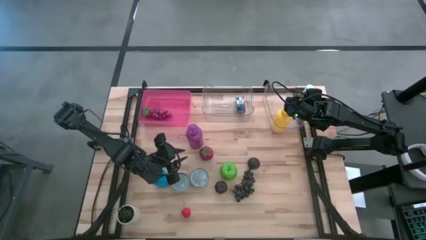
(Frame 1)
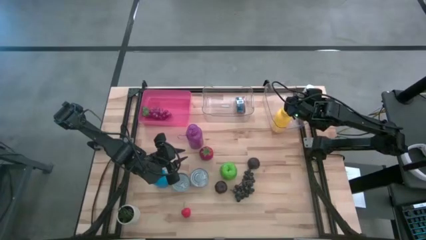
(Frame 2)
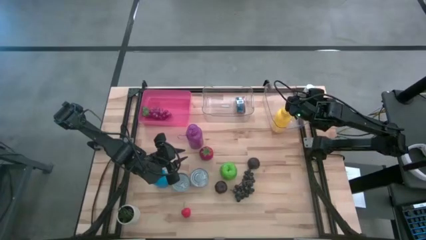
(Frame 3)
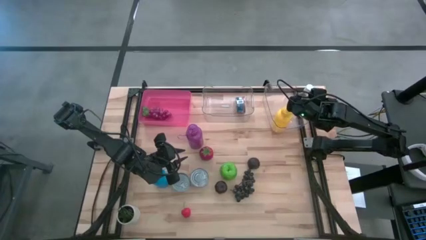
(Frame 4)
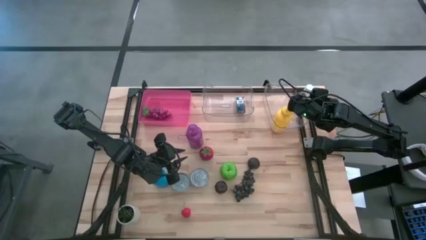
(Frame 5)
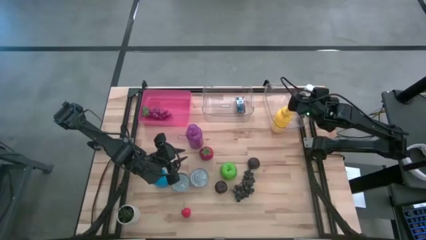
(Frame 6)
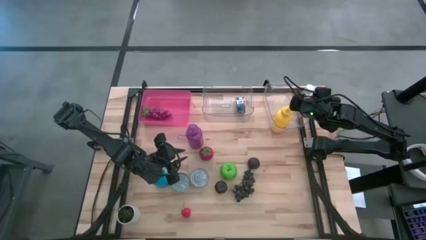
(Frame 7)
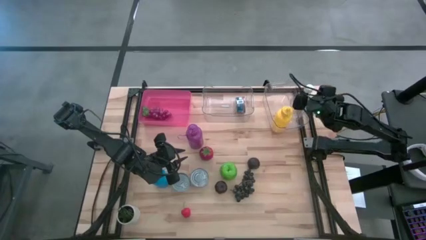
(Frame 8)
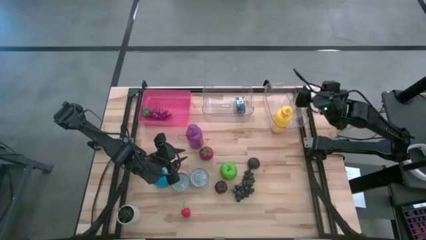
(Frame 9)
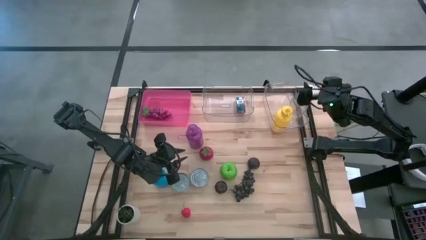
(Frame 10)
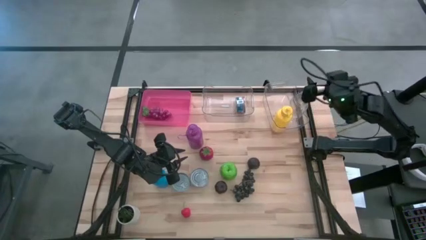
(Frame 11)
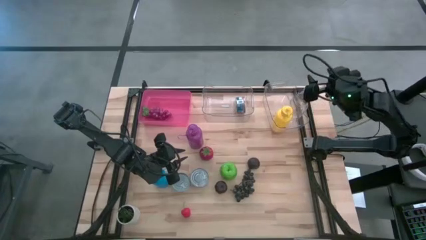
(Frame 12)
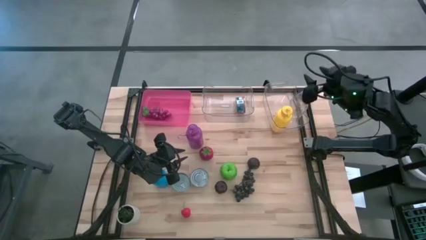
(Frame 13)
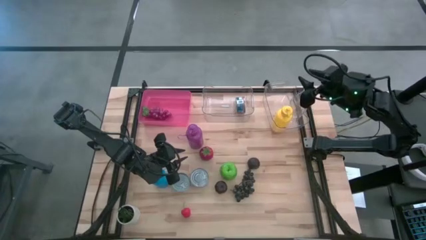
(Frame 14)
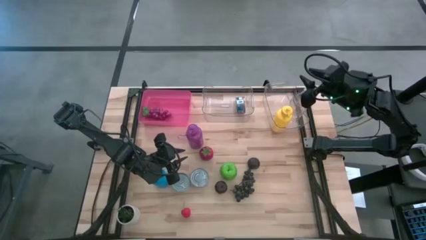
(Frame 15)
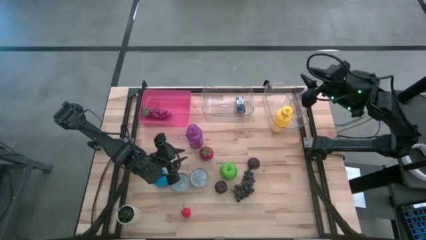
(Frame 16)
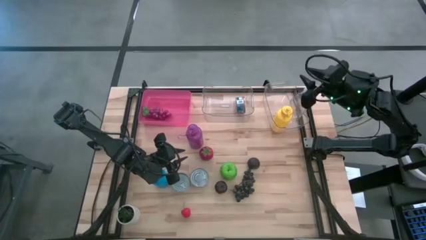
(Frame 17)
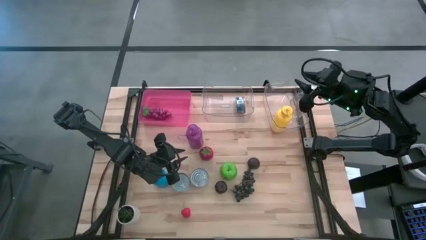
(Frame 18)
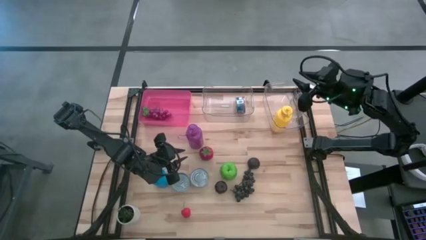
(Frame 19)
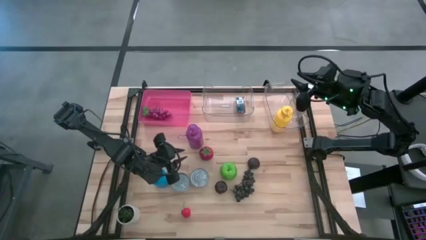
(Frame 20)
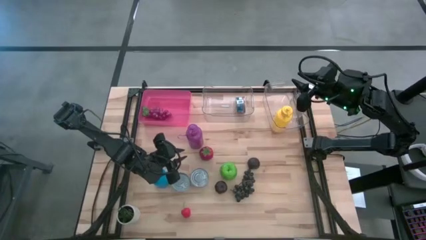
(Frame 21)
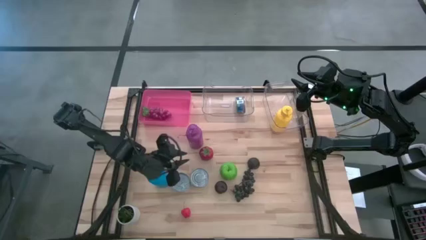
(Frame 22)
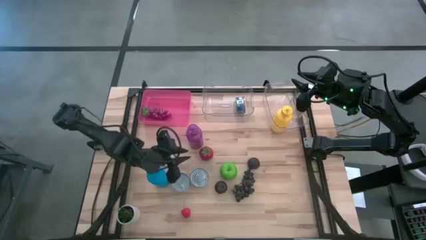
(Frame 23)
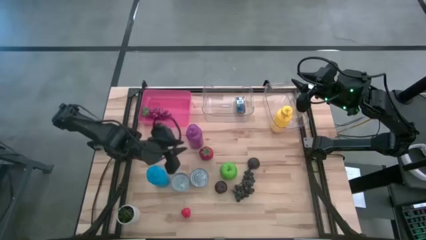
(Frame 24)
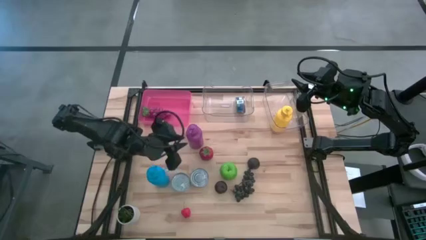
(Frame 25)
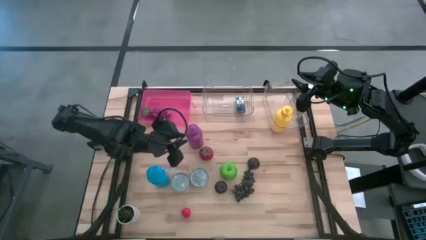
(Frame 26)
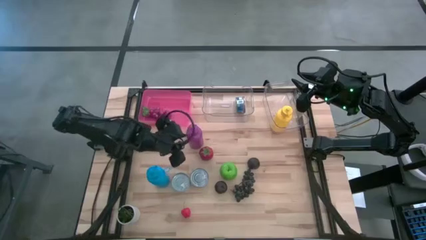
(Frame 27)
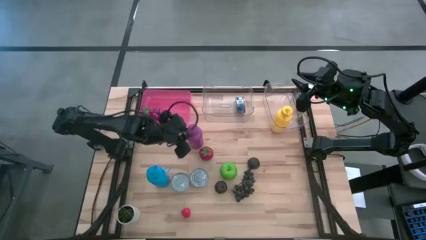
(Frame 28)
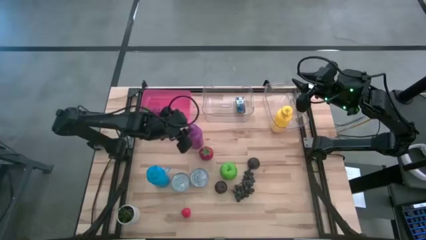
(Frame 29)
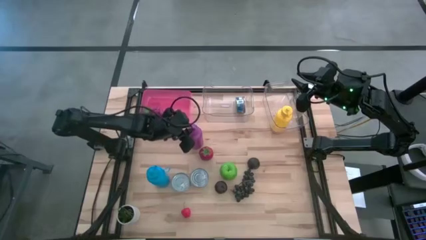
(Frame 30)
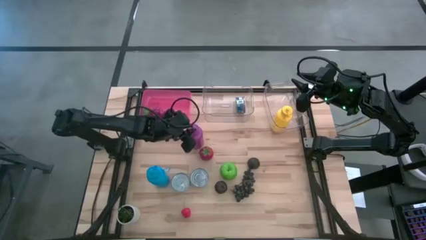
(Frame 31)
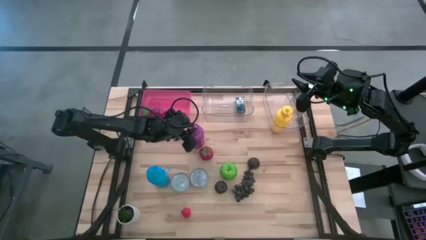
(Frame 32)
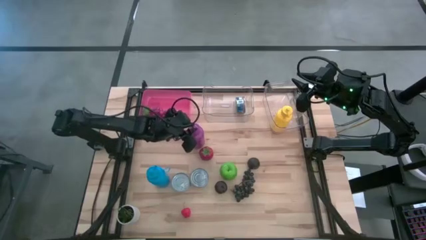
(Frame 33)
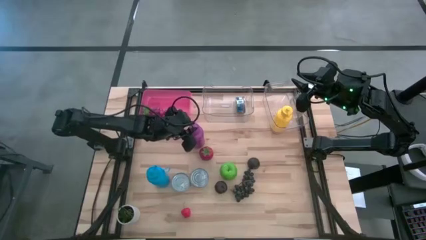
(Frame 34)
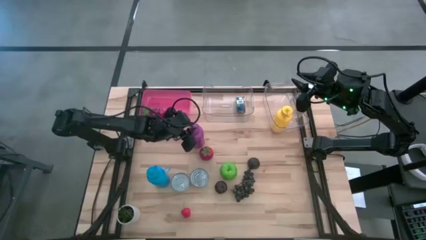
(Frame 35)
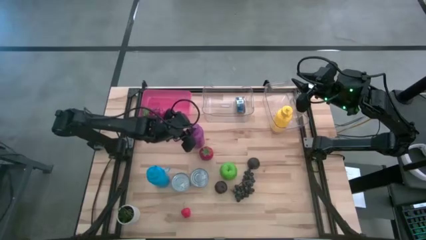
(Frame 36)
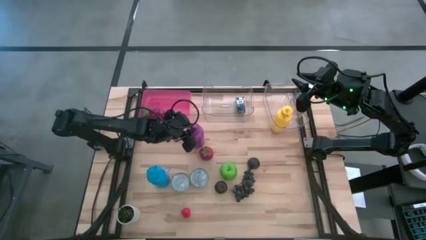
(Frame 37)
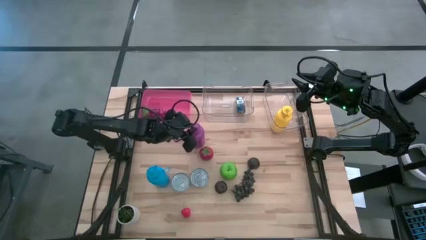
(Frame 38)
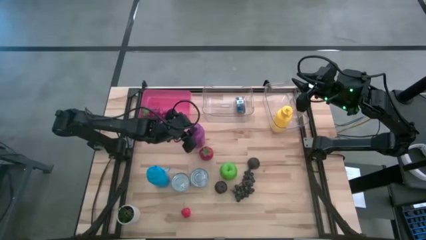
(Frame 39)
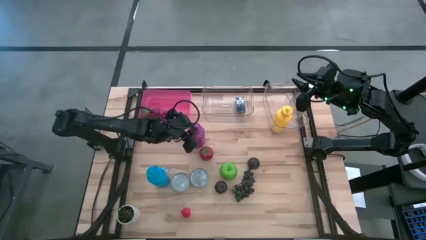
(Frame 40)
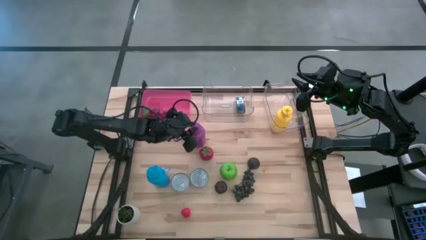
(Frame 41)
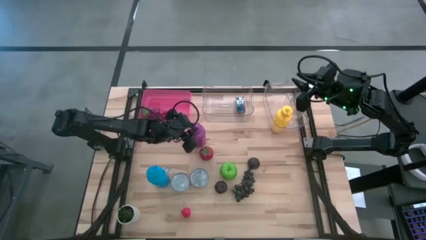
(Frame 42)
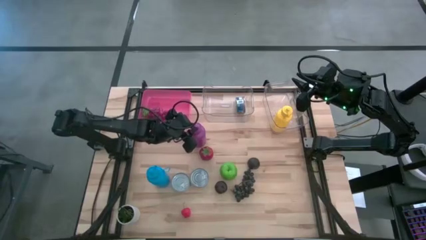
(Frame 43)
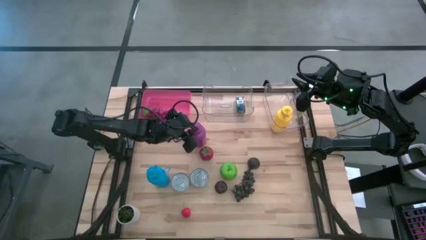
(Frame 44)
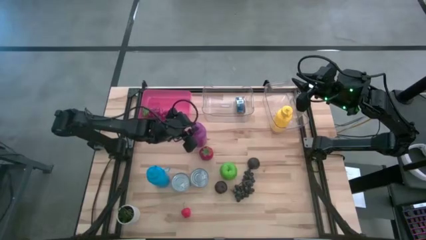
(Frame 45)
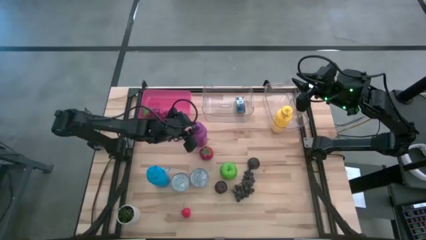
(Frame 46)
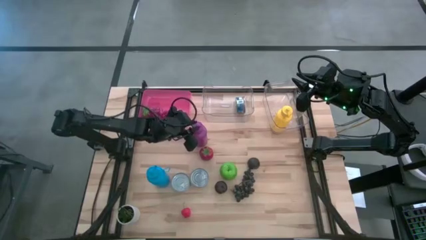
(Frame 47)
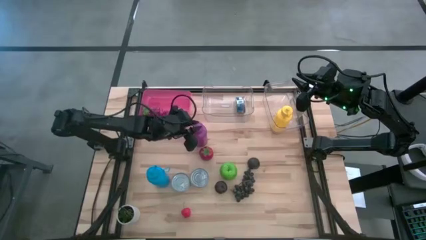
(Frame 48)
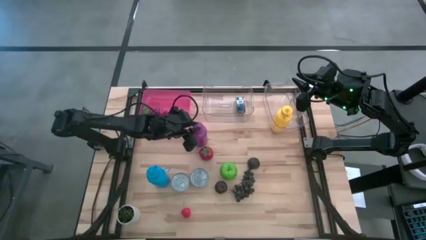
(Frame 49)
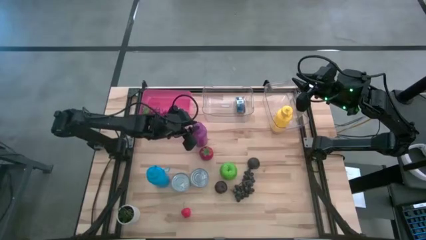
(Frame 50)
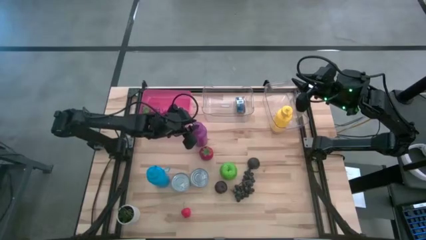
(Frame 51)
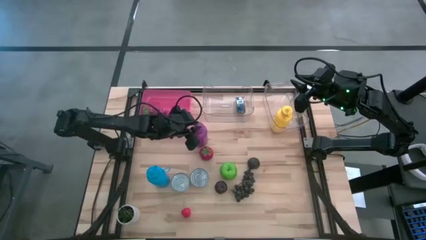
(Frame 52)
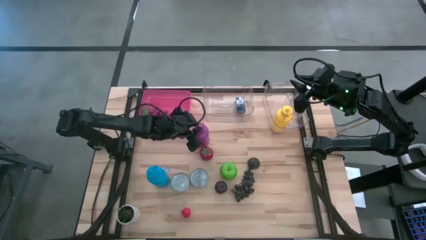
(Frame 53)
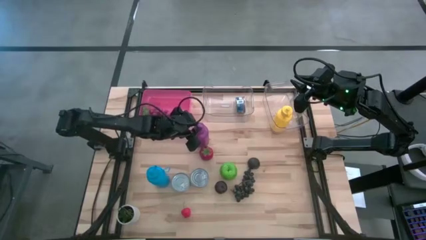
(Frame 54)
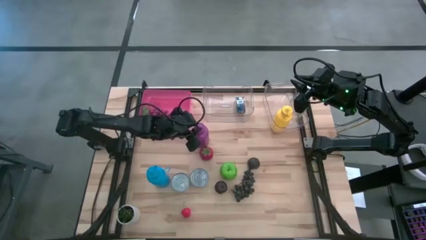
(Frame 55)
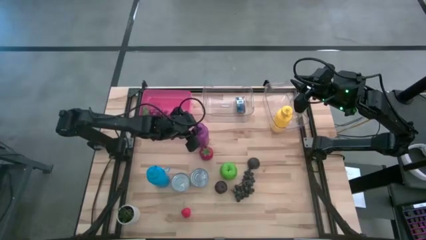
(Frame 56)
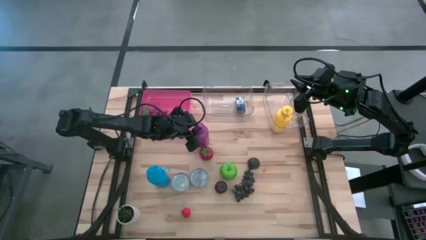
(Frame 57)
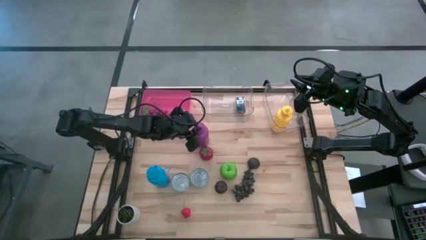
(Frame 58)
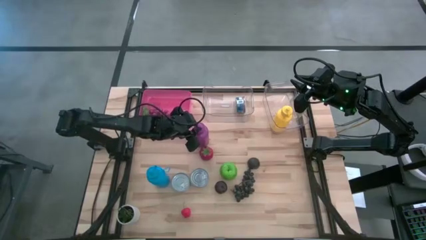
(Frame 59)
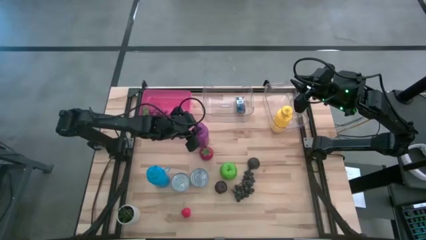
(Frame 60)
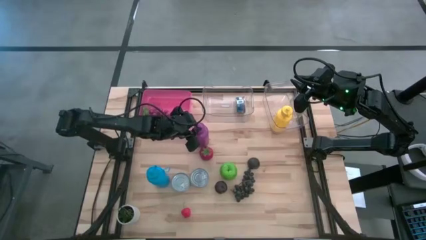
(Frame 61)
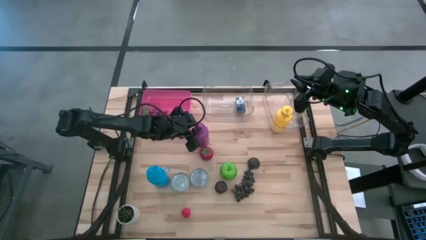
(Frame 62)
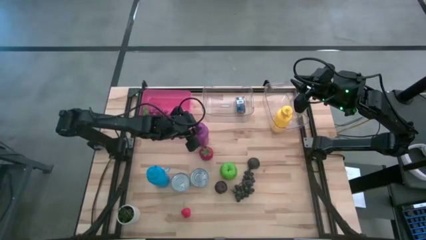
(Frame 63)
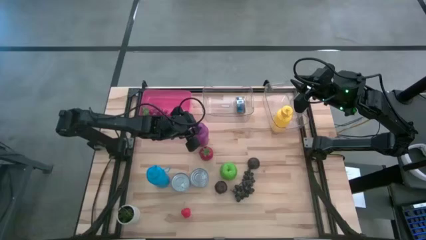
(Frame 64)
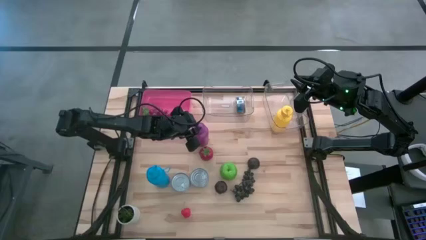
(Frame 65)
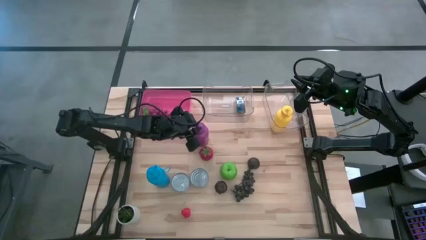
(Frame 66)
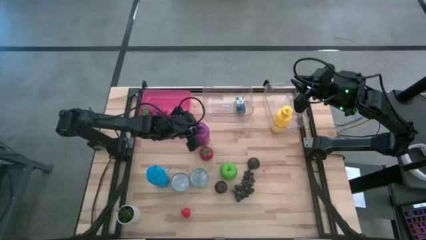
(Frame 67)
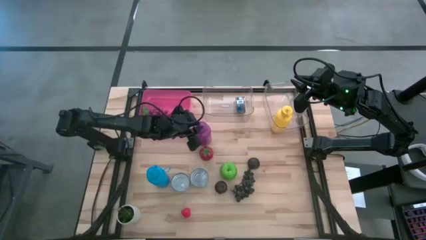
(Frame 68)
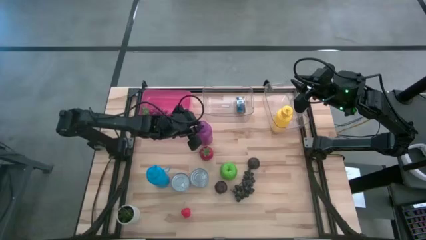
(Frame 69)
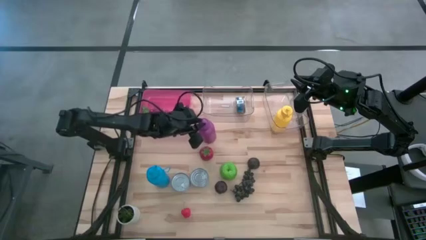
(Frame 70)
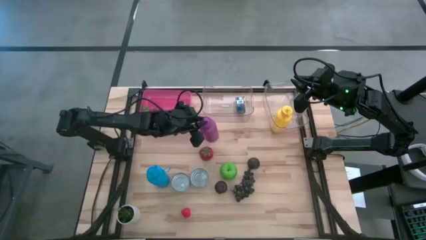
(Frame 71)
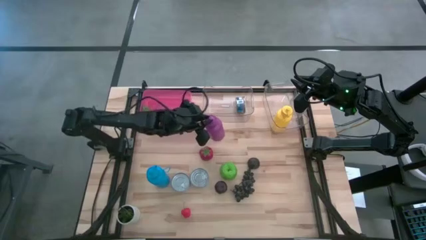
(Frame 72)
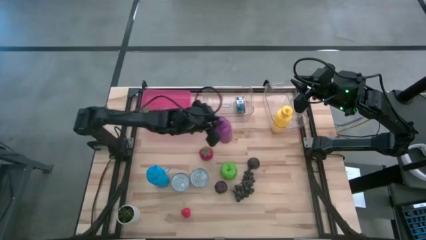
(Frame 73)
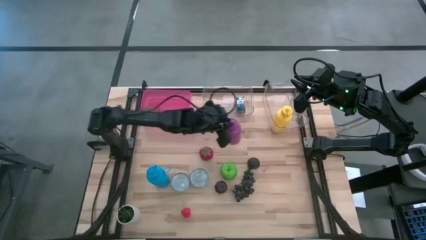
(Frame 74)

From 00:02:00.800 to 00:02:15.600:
Task: Pick & Place Food Item
Put the purple water bottle into the right transparent bin

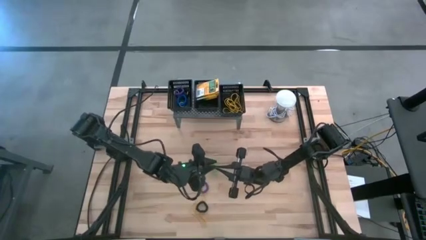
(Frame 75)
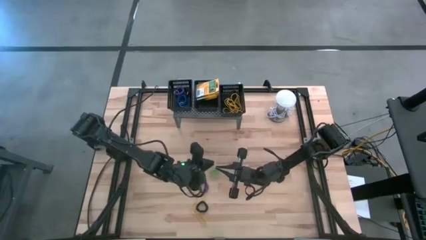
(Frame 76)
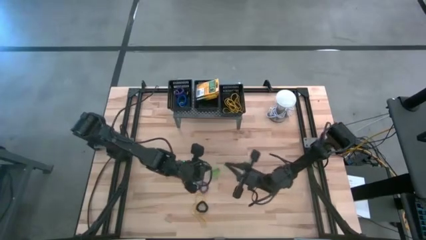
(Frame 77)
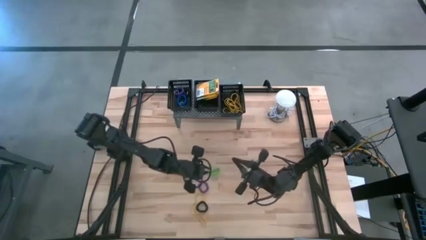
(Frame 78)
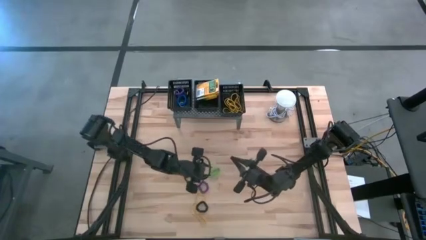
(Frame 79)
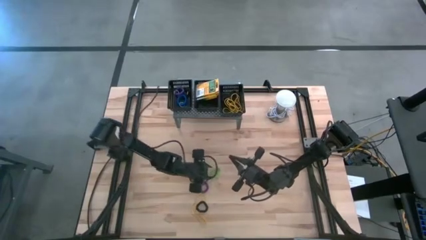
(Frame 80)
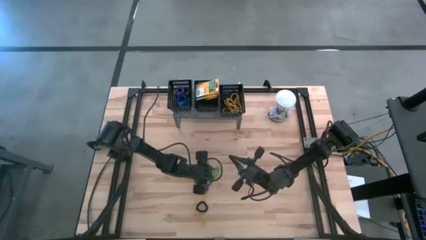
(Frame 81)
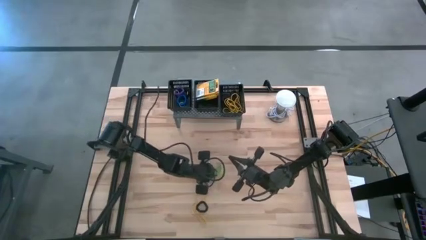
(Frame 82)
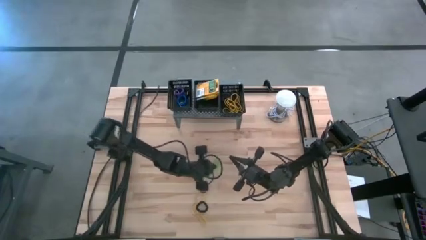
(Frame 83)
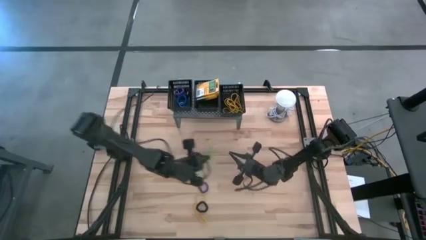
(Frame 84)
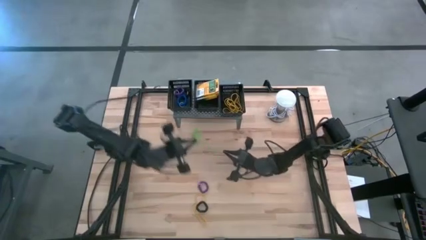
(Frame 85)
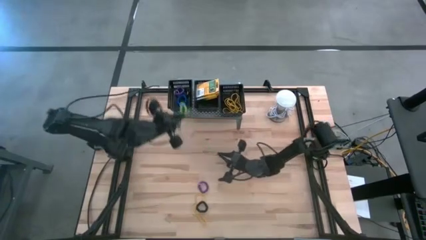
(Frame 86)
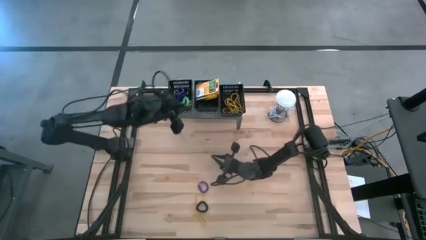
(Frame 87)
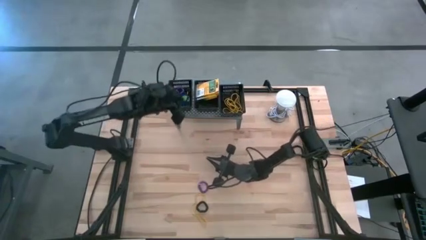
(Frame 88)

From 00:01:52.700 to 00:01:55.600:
Task: Pick & Place Office Desk Supplies
Put the green spring keychain into the left black bin on the shelf
